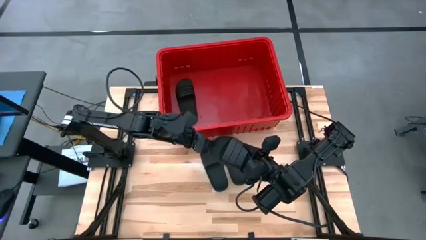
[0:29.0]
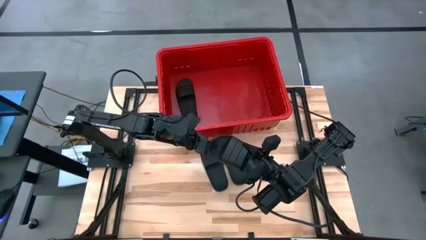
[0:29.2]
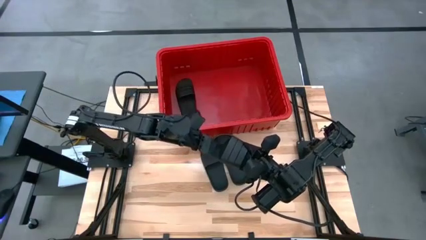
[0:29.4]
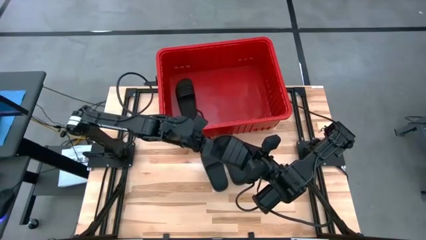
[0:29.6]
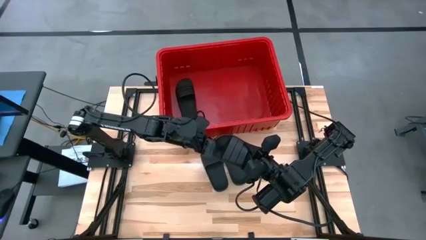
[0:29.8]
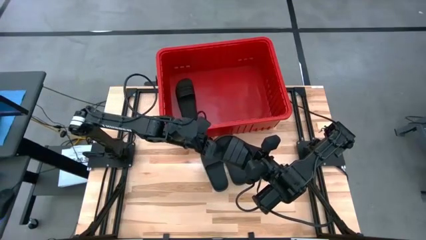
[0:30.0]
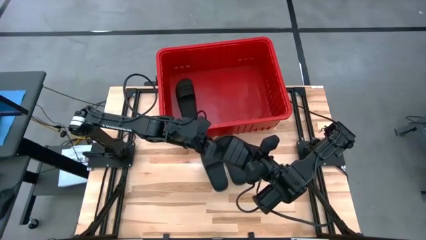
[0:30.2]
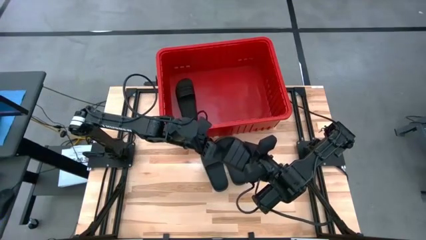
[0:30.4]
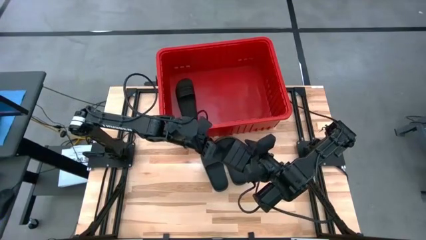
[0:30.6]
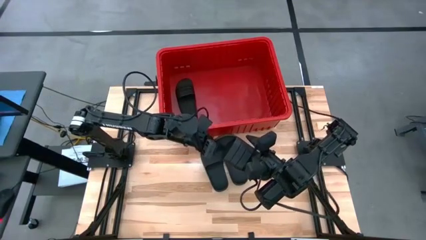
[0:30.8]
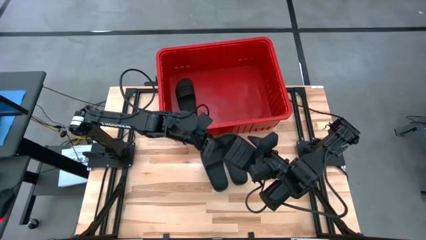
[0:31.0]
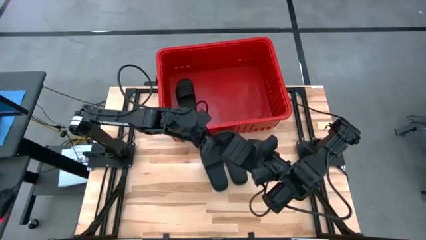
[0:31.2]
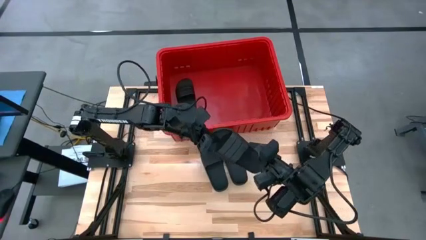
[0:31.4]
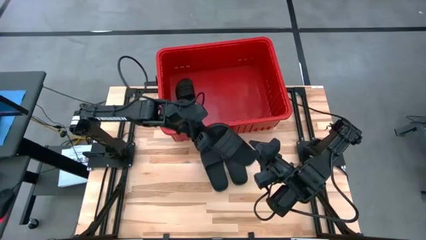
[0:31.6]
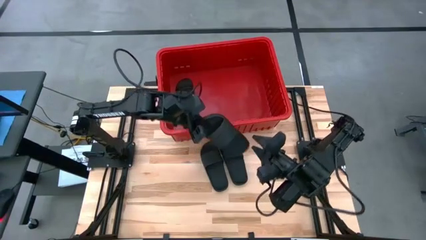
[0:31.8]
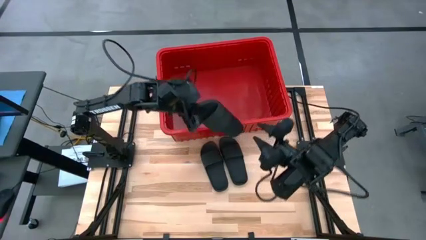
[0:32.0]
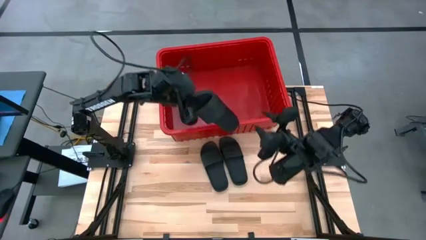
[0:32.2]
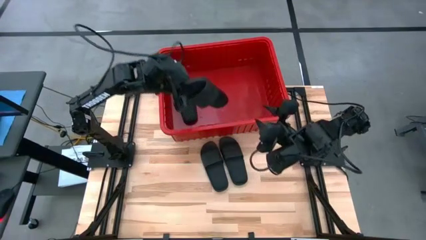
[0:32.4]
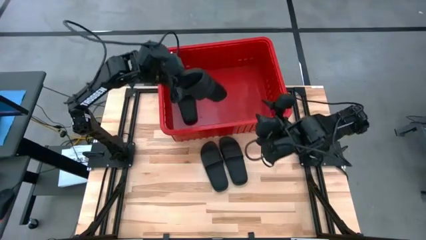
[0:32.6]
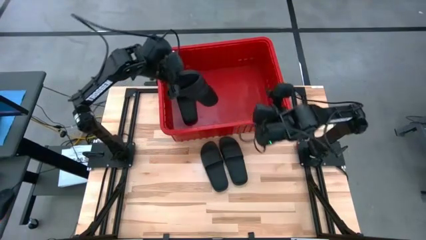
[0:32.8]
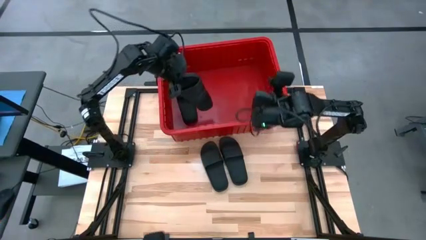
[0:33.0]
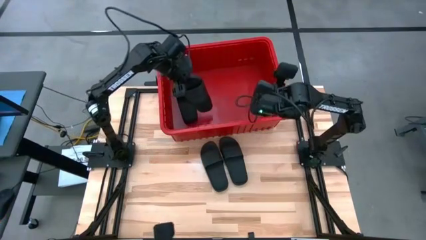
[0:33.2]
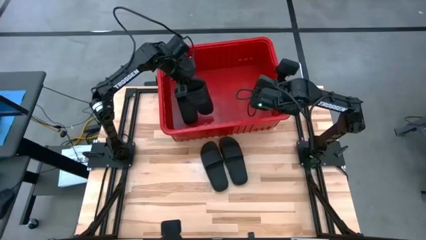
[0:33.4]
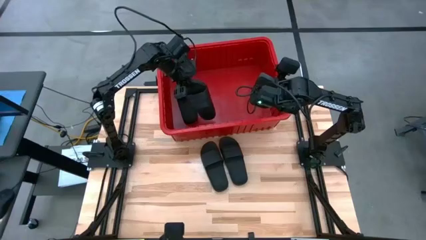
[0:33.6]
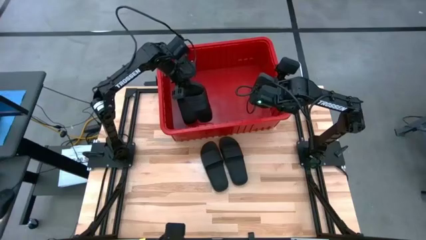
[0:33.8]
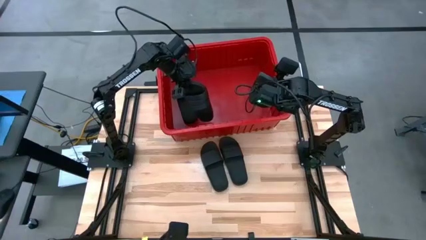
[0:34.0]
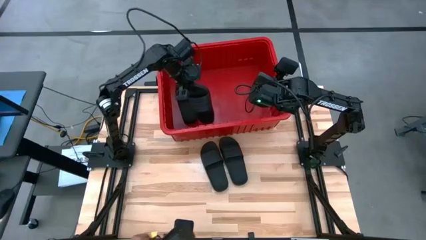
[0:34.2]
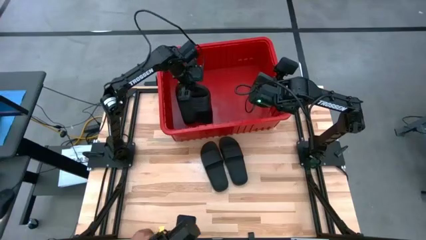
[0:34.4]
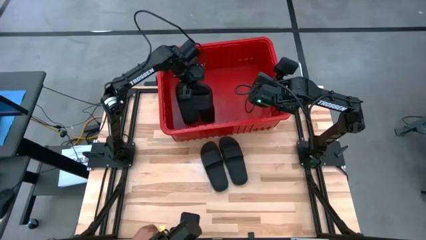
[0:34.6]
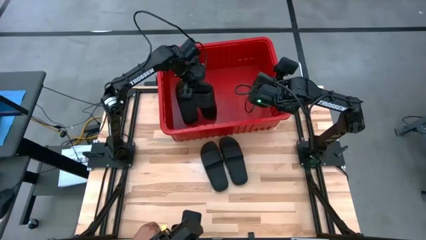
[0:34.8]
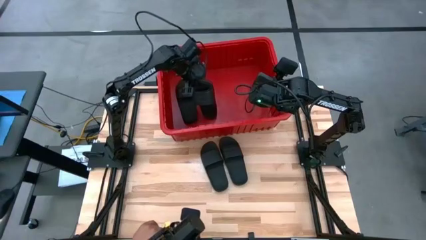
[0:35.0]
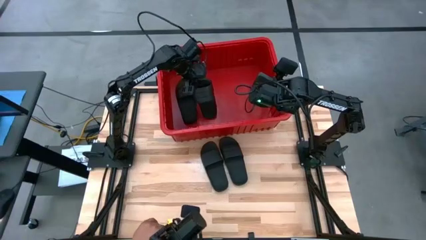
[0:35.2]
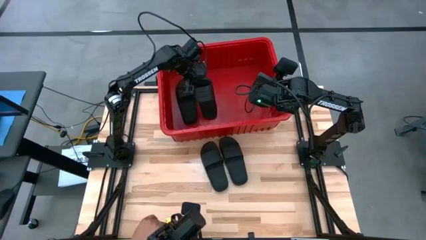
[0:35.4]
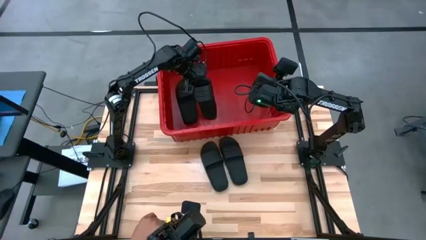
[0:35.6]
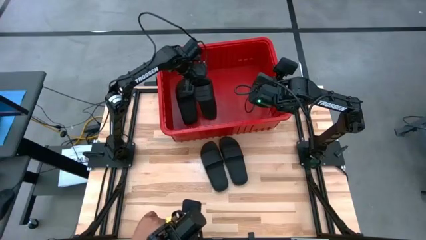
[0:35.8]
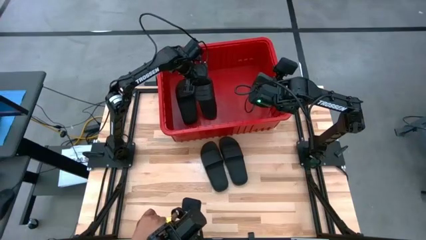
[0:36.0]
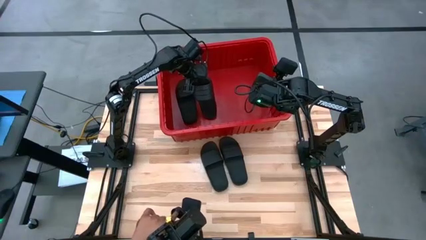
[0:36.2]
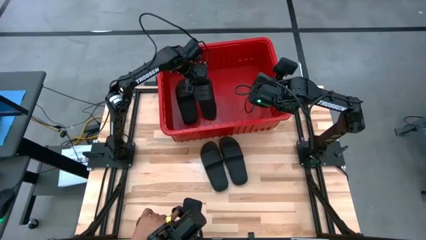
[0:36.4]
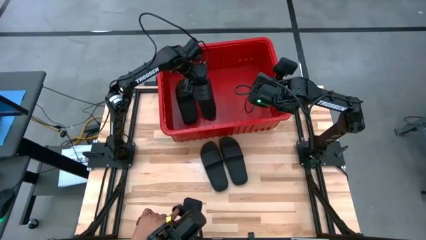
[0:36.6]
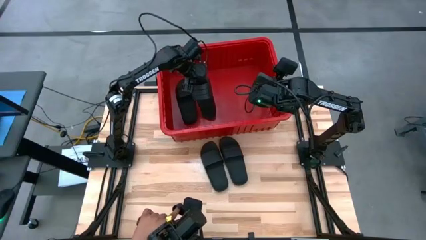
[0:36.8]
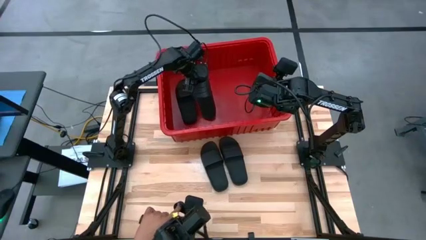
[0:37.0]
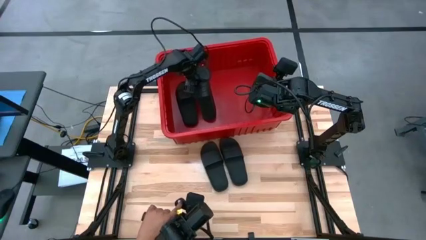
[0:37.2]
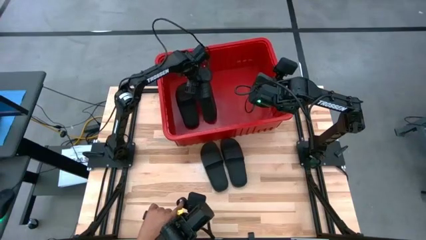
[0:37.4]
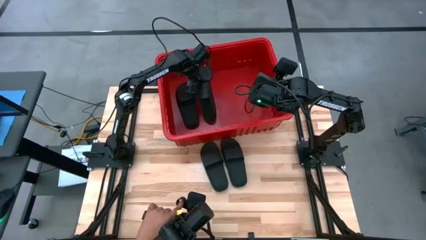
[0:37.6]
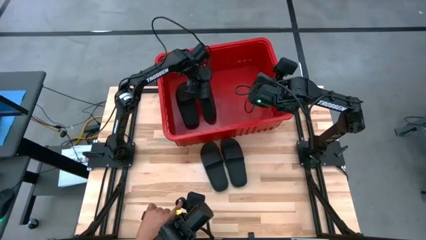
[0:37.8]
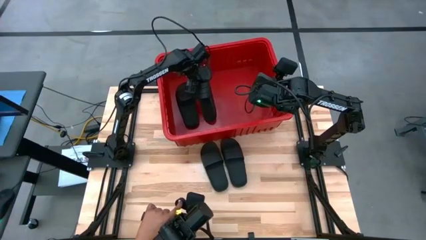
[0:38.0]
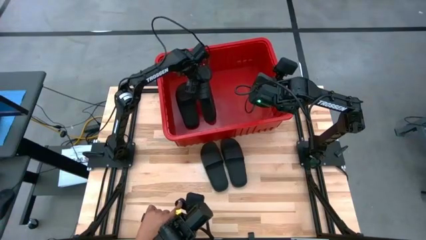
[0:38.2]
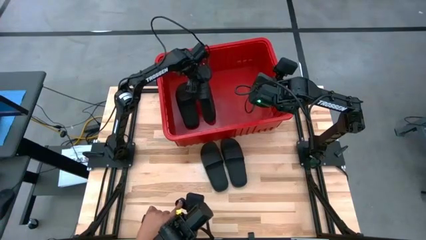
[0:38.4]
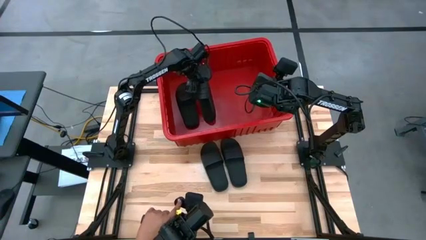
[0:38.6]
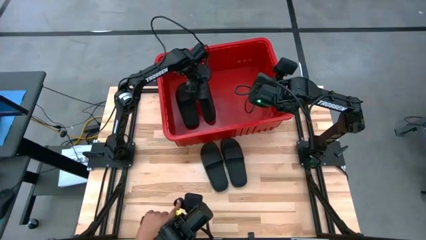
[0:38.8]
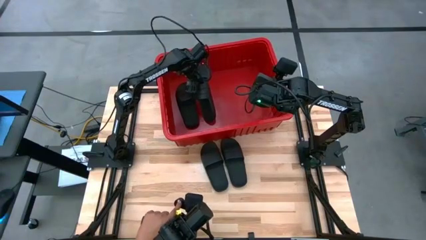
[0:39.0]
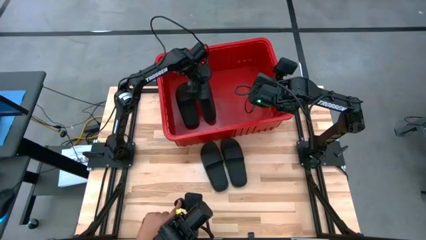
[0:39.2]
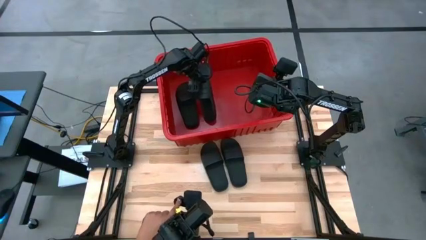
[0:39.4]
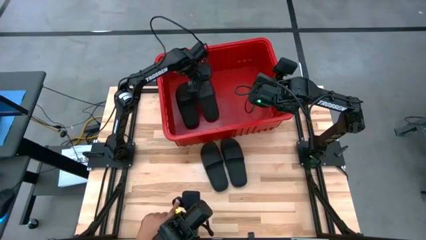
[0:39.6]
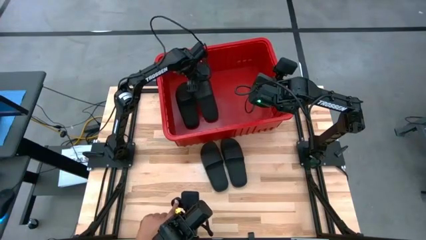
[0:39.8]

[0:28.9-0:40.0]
Task: Pick and place slides into bin
Put the black slides into the red bin
